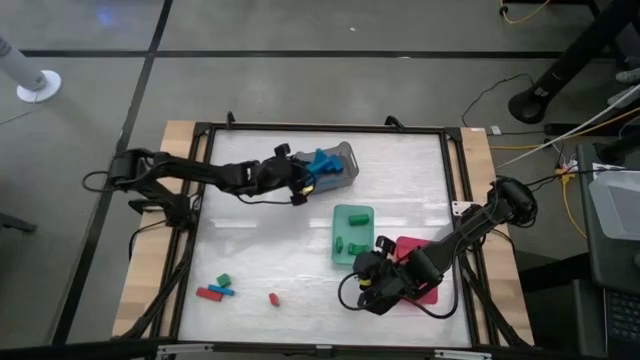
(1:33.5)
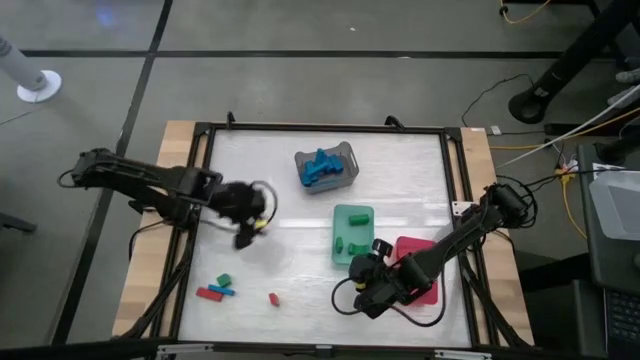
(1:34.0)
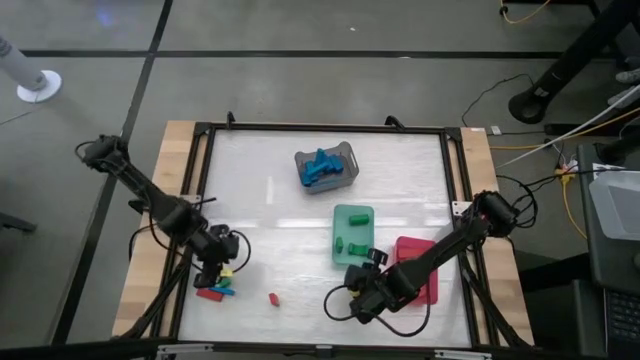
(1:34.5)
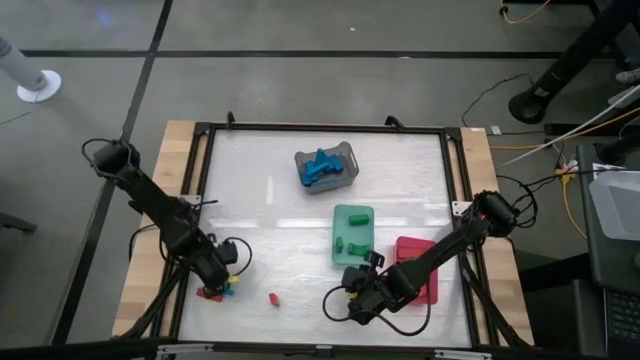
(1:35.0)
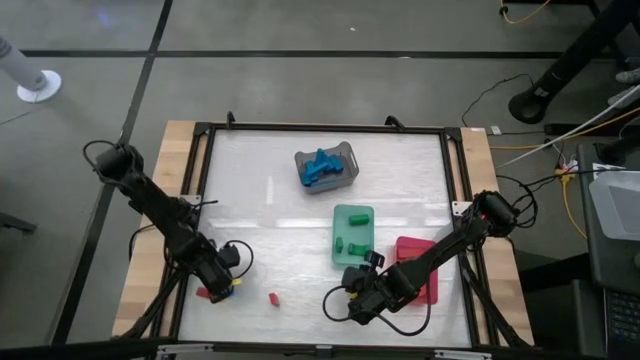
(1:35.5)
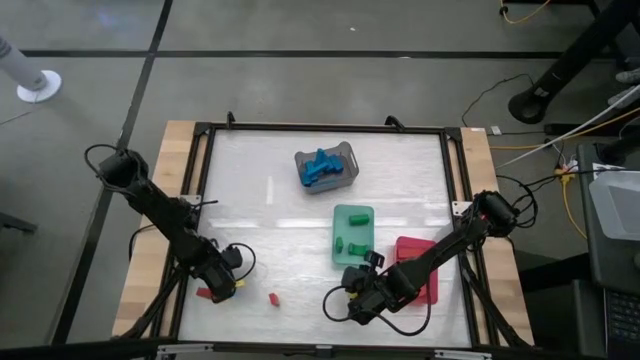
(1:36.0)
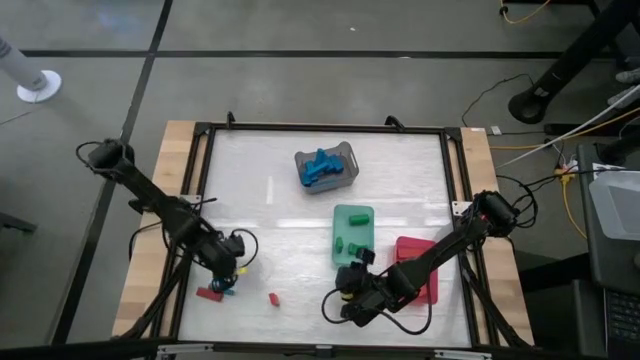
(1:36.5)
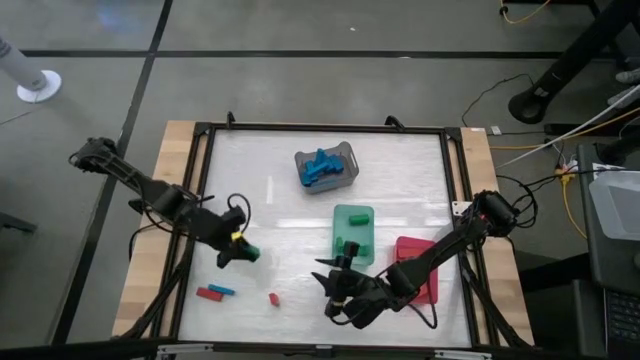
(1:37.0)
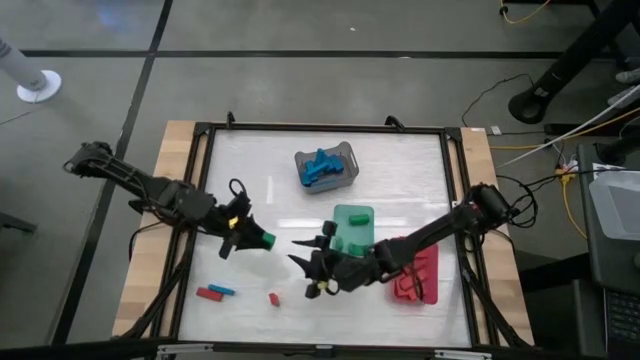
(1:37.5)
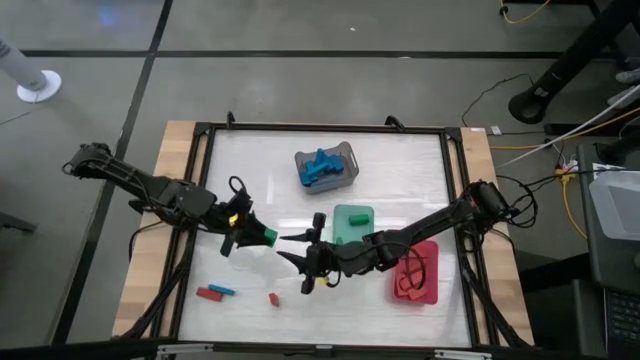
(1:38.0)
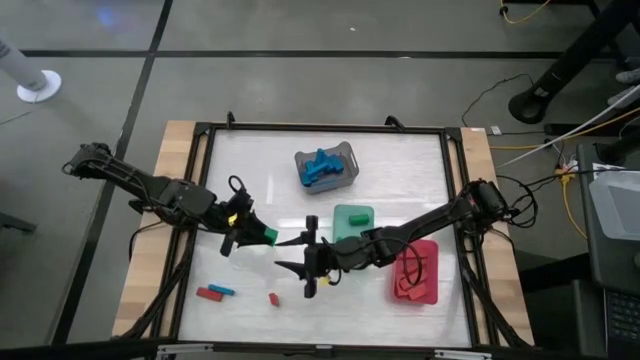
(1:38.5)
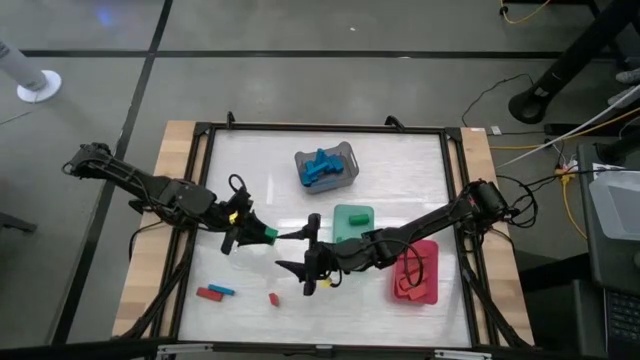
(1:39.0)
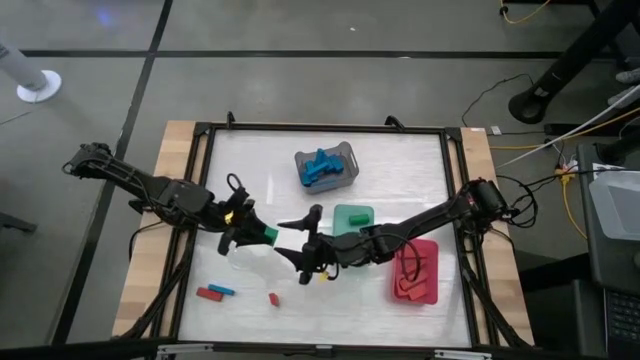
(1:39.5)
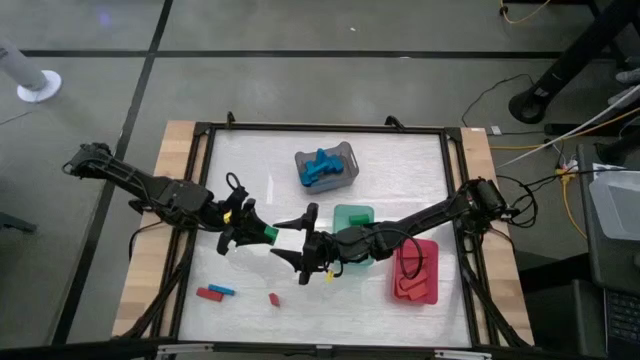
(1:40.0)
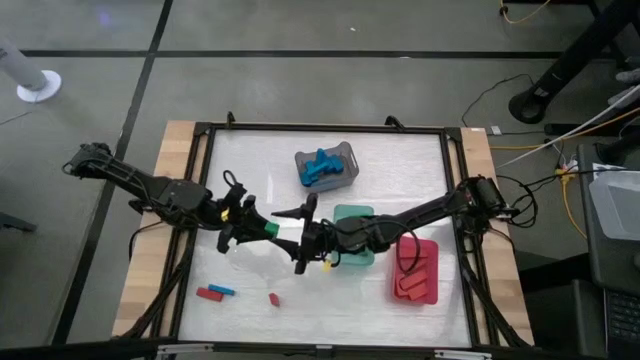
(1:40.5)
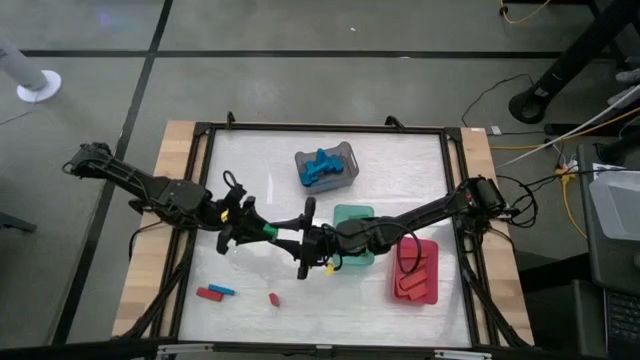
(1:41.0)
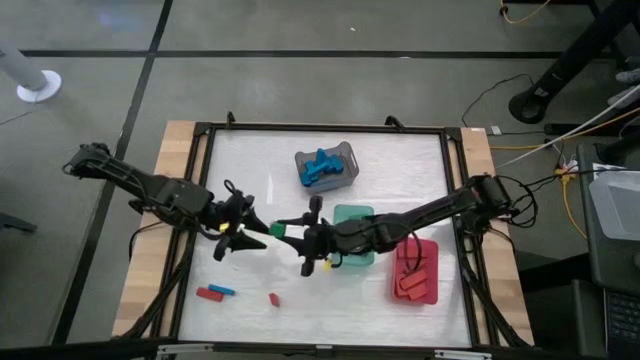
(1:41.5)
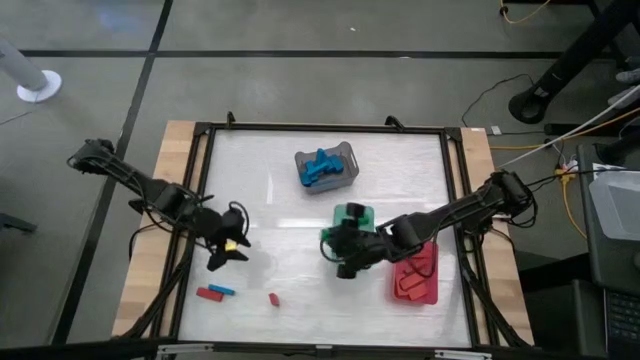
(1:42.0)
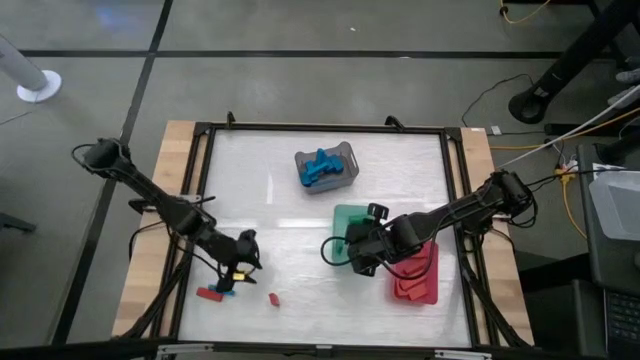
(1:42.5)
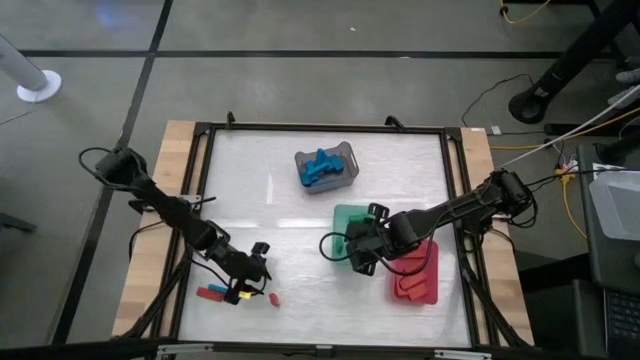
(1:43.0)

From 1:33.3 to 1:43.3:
Task: Sort blocks
Put the green block into the green bin

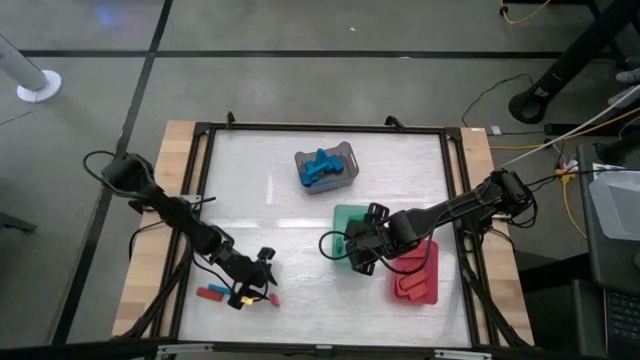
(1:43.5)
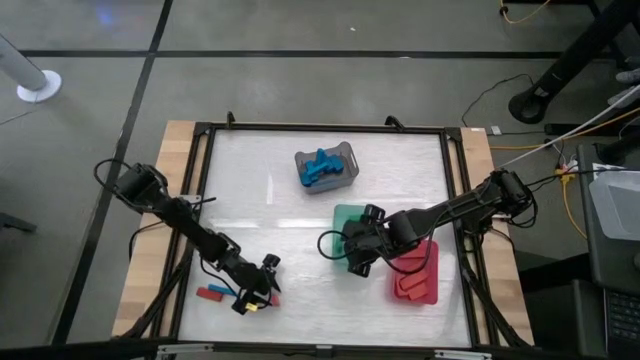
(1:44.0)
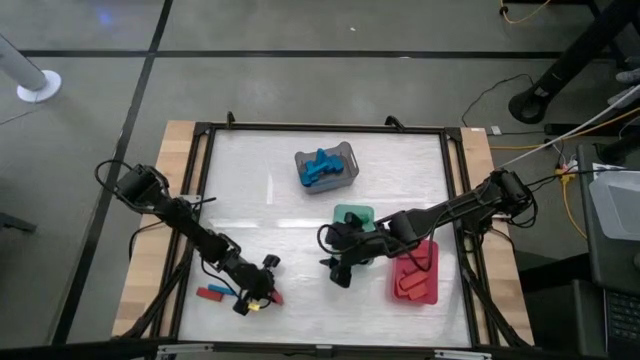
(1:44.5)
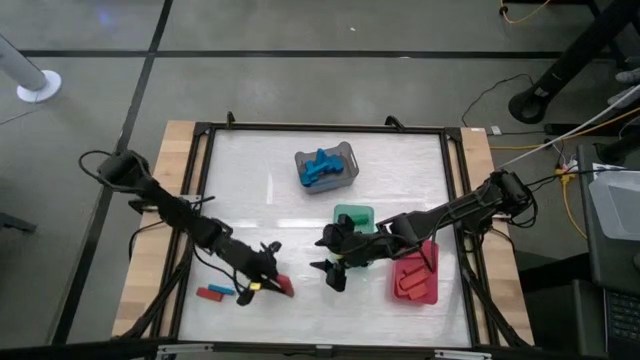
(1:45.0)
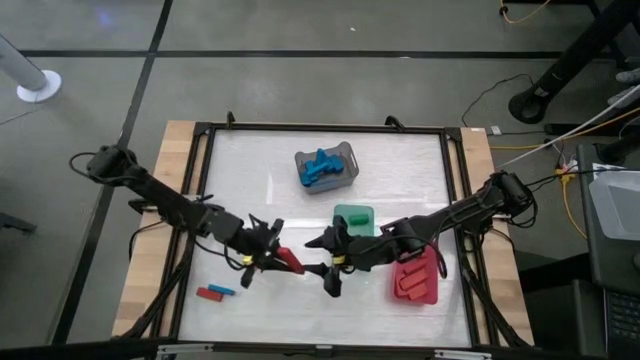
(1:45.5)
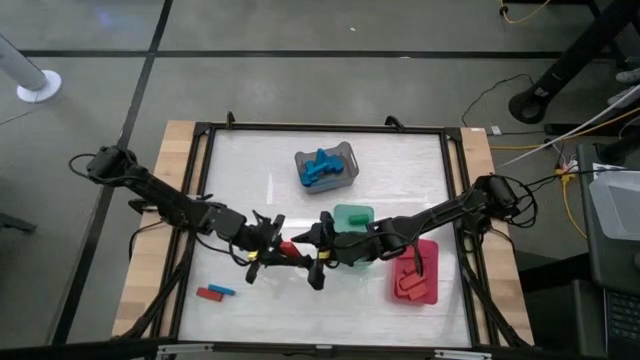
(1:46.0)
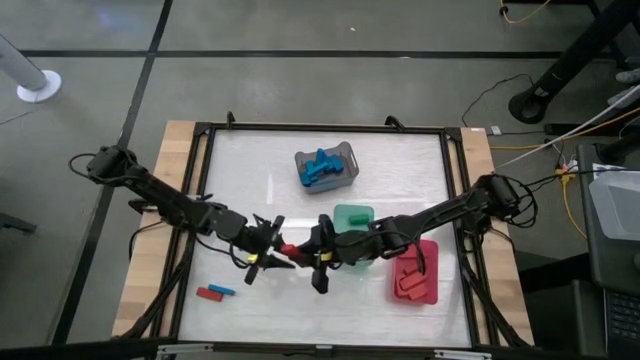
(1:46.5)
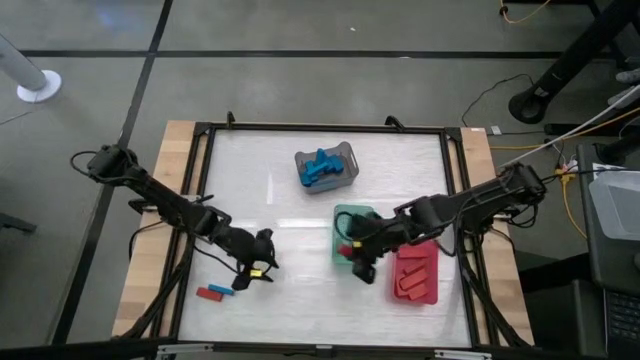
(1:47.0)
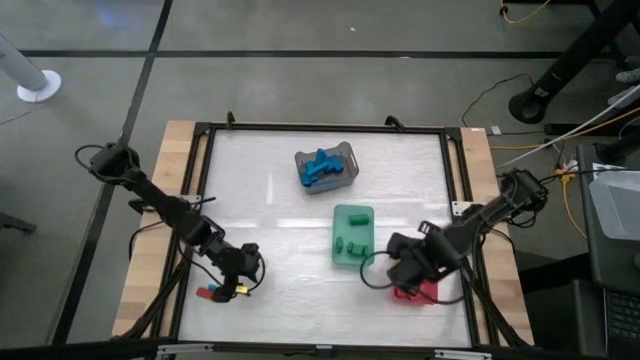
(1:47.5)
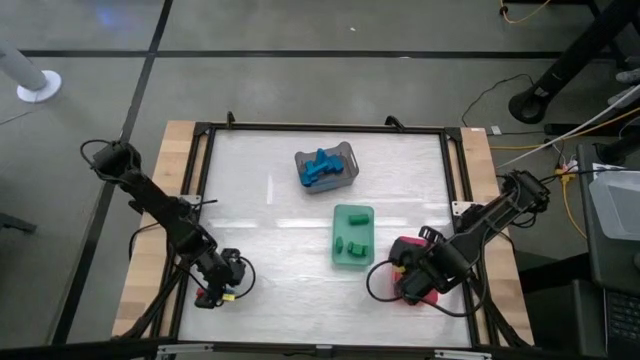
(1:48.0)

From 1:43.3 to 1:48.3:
Put the red block into the pink bin

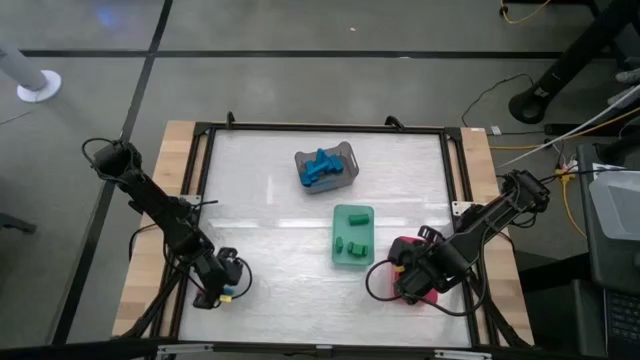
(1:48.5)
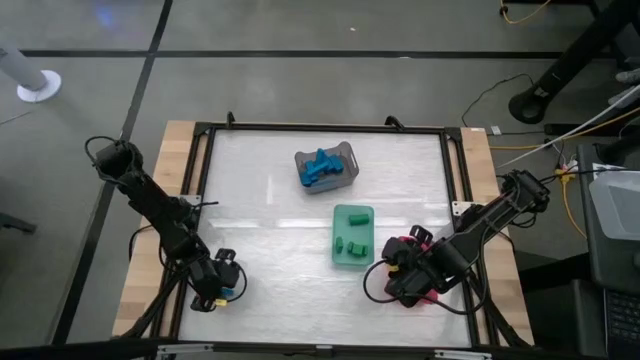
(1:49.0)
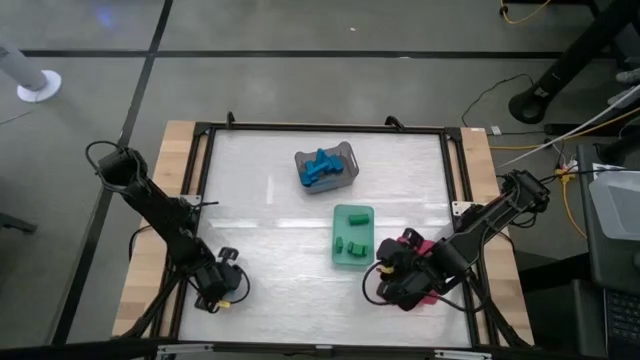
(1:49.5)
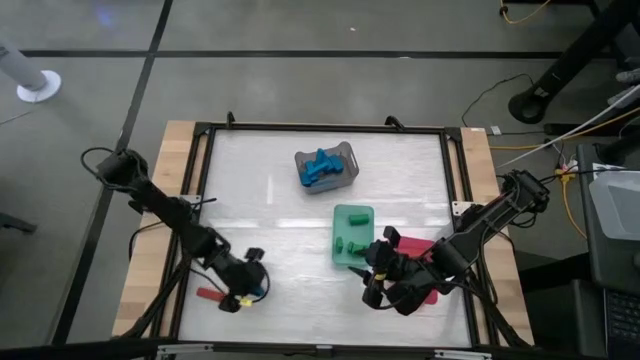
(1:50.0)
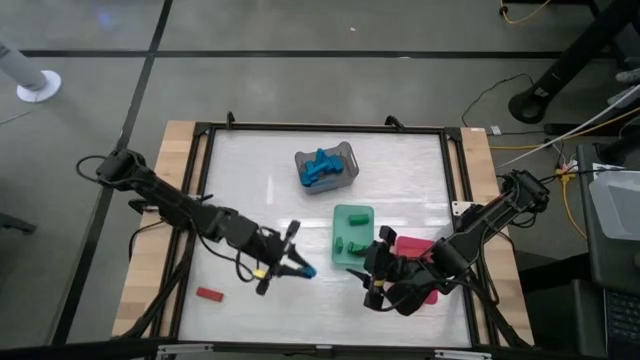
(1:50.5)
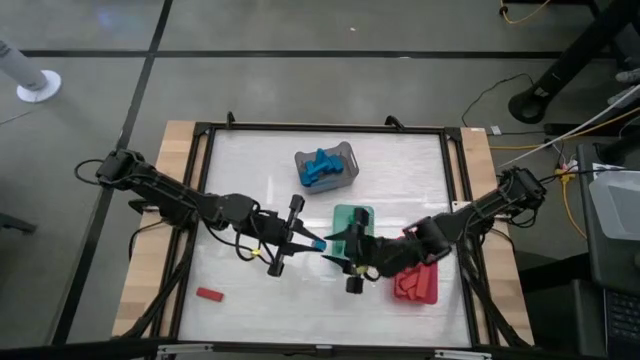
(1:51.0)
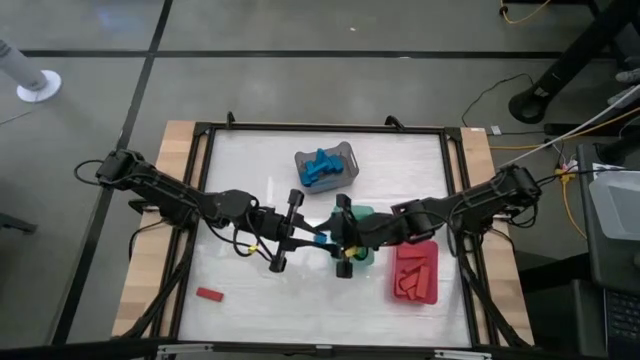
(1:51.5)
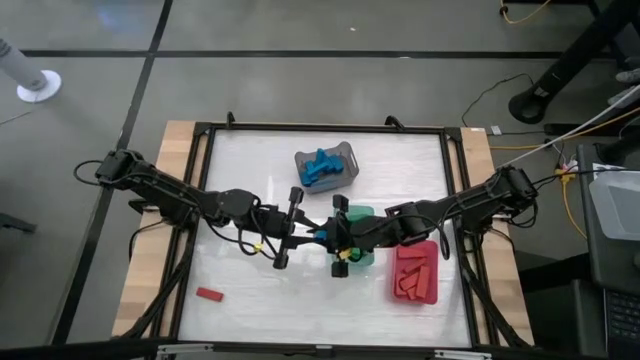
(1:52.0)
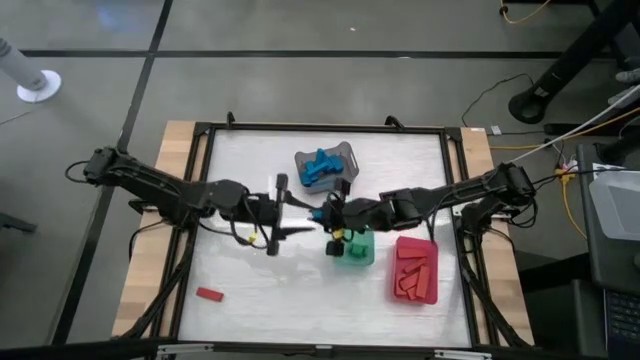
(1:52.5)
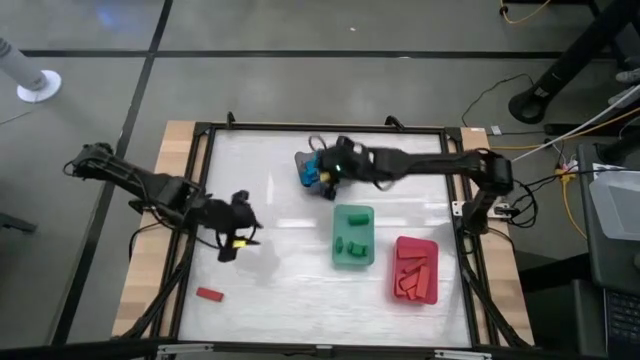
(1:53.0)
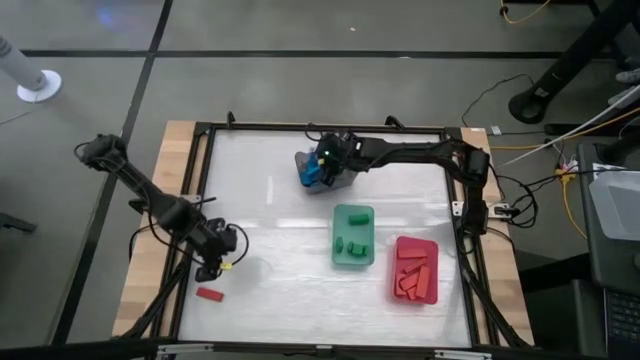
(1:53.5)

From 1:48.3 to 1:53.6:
Put the blue block into the gray bin
